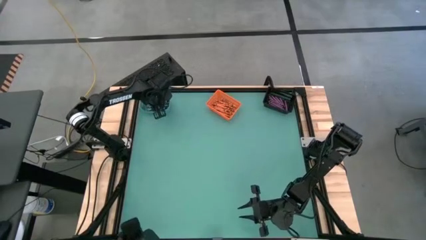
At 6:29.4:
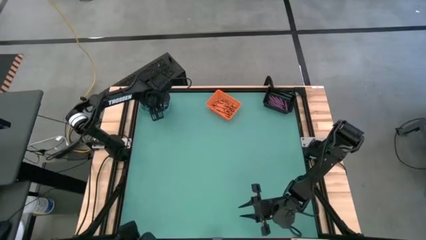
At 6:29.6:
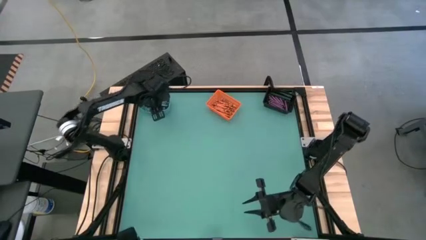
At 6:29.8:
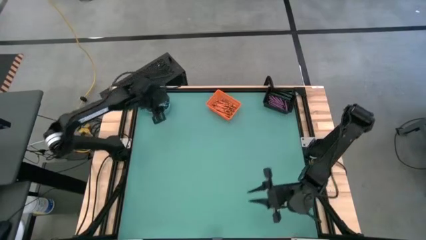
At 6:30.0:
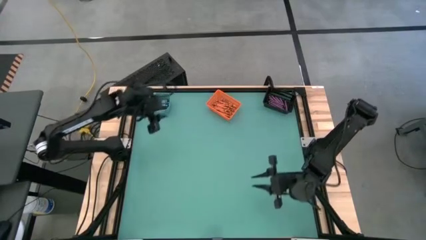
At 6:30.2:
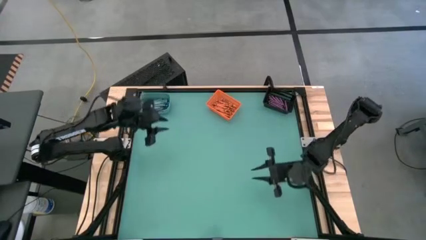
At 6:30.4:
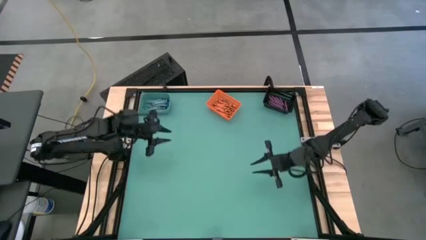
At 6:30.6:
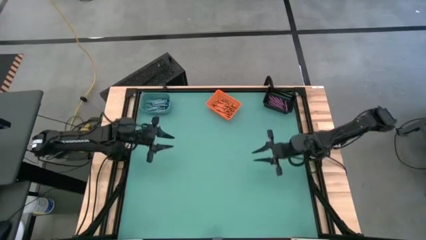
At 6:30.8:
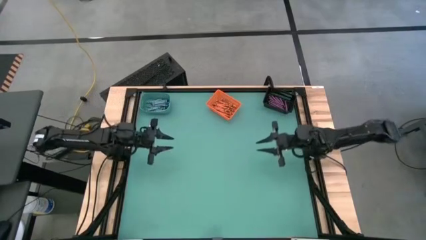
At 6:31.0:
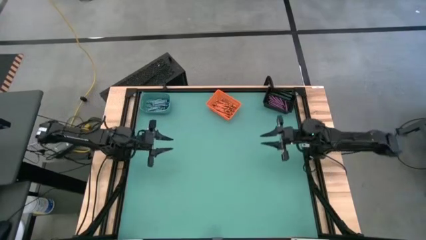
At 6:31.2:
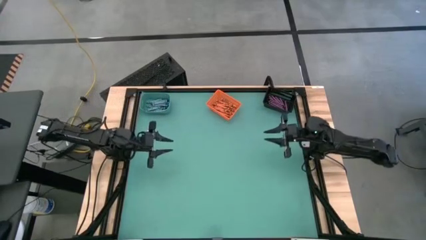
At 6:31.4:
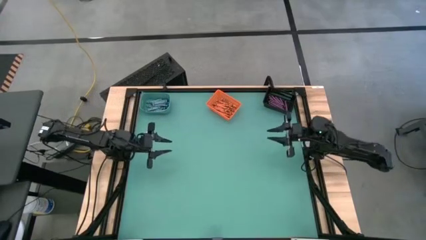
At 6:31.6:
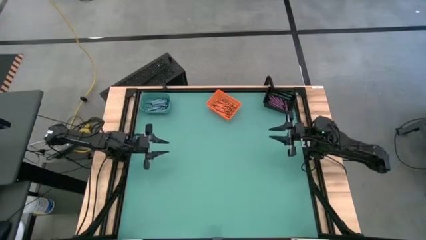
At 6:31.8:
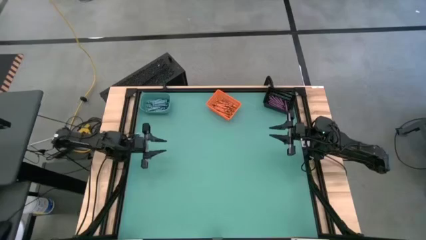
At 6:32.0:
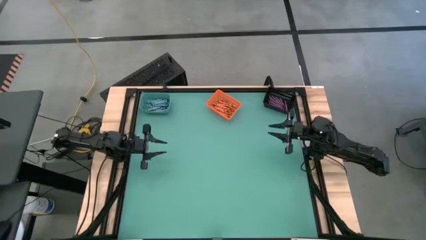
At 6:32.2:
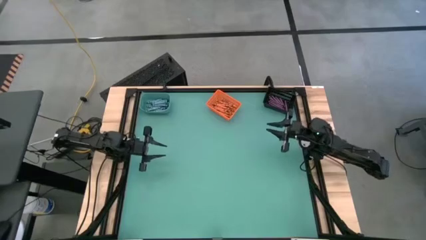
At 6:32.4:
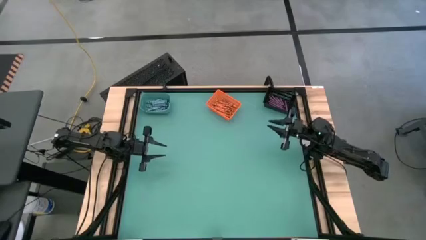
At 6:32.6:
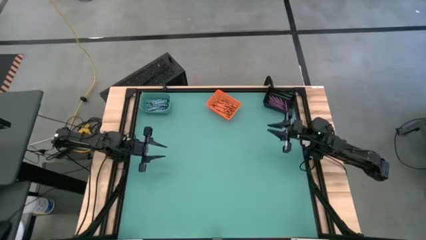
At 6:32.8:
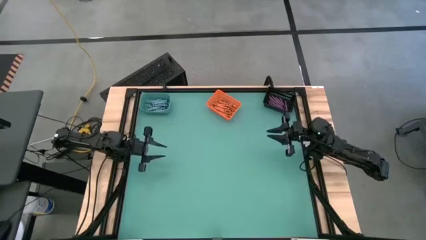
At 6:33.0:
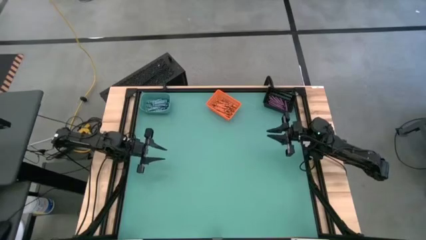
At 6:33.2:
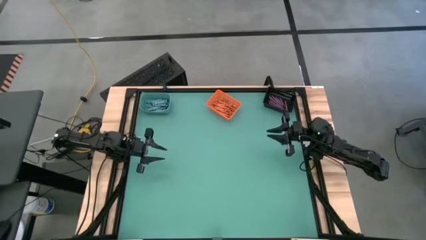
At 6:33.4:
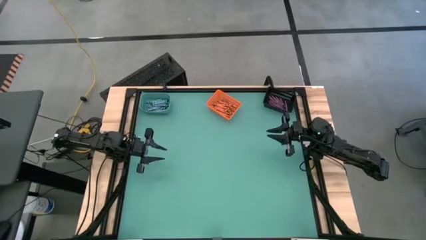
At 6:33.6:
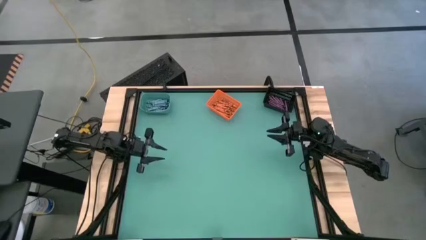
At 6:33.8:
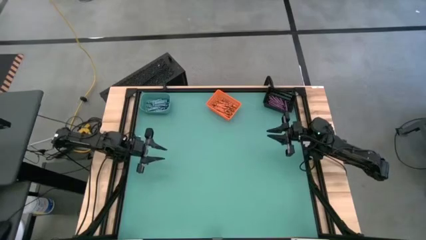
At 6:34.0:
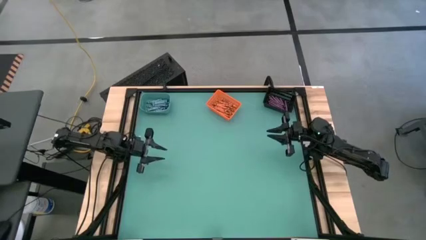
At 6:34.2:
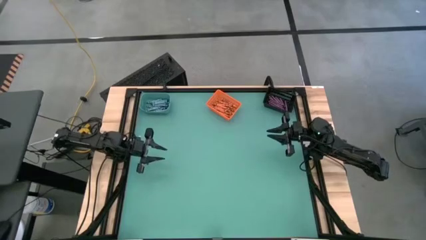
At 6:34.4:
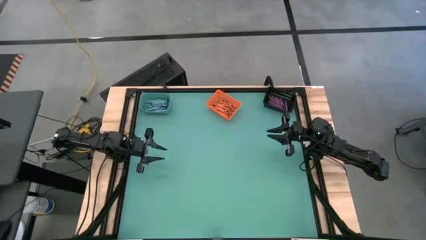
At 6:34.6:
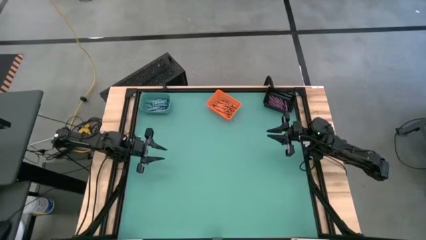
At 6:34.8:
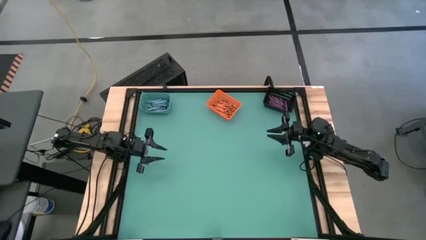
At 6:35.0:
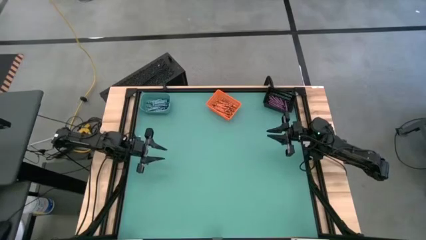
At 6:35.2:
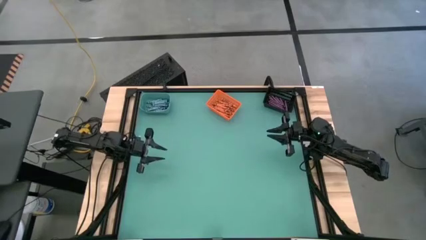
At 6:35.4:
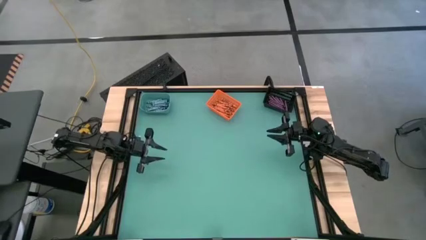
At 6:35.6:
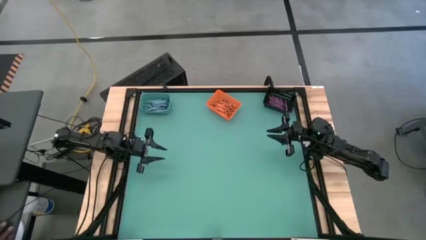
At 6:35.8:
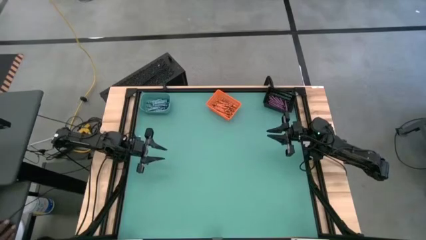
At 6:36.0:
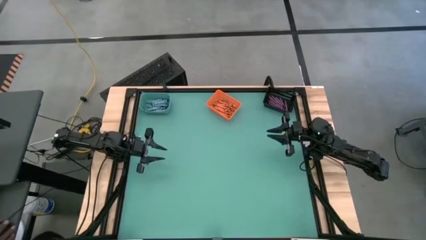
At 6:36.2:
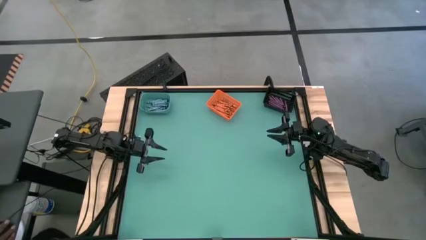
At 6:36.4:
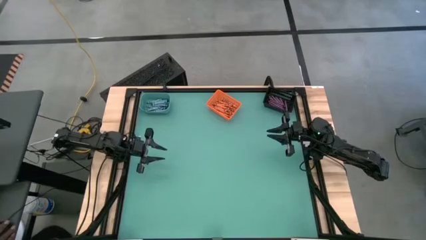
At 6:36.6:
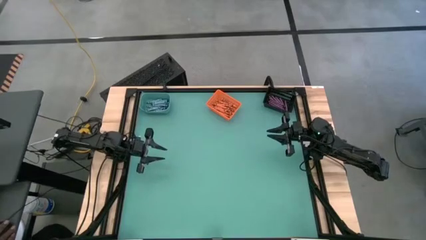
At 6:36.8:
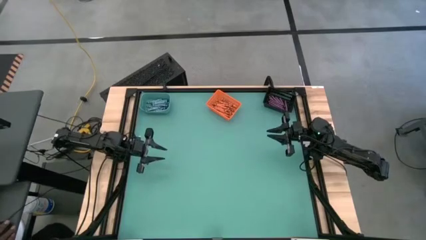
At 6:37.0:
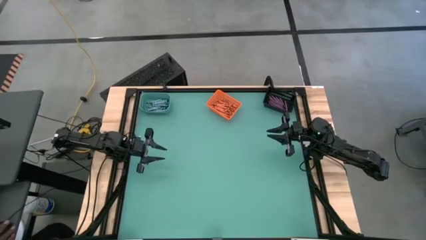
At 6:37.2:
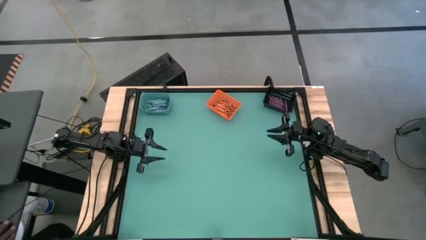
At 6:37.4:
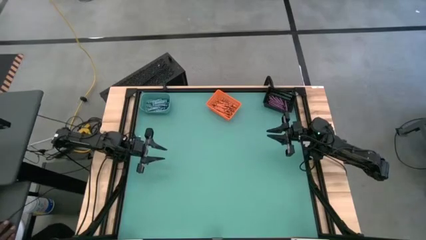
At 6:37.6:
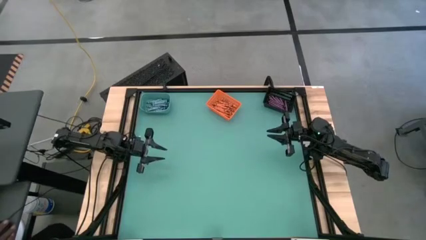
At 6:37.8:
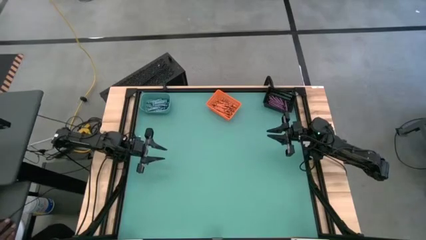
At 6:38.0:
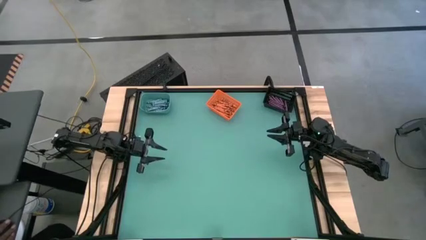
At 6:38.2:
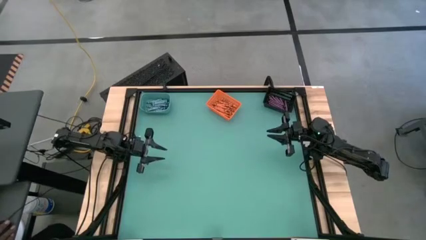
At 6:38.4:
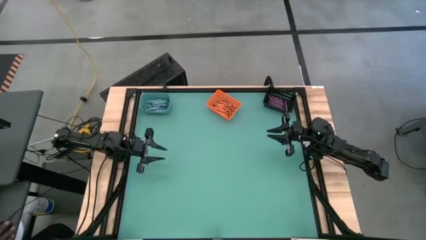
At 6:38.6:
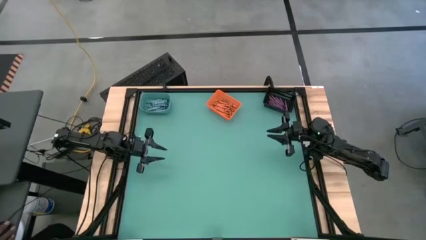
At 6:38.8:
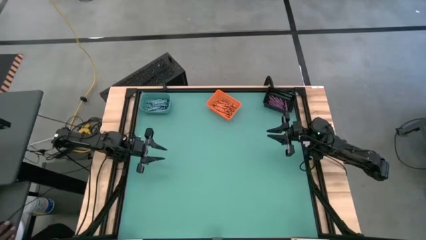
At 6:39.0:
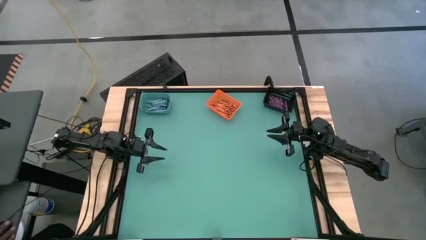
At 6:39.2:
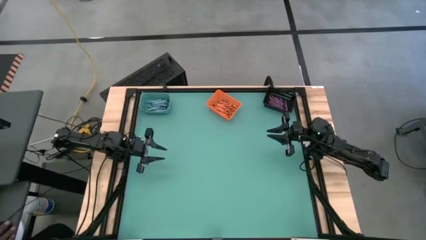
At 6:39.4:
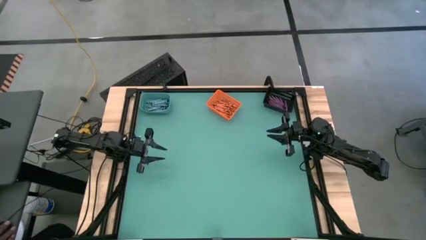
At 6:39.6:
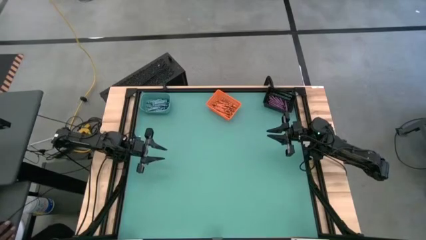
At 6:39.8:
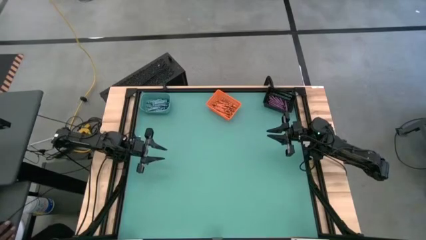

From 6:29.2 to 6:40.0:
Task: Sort crayons
Return to Home Position

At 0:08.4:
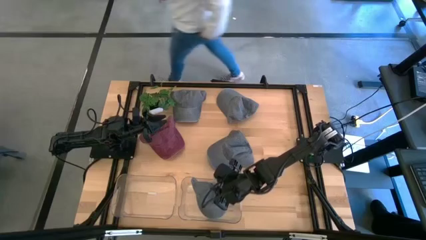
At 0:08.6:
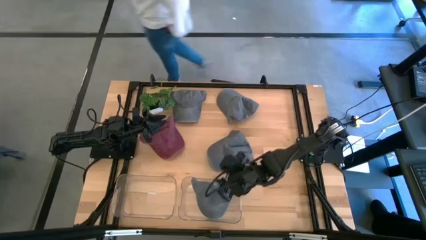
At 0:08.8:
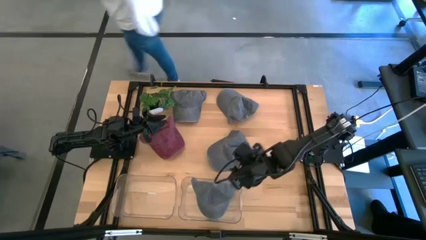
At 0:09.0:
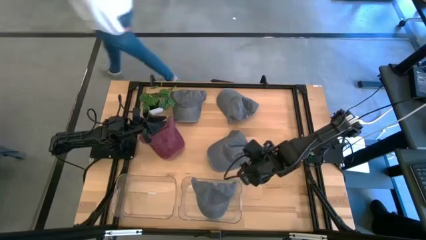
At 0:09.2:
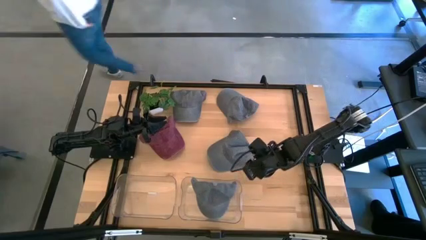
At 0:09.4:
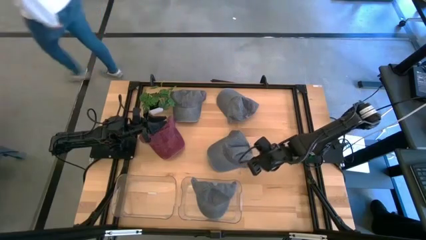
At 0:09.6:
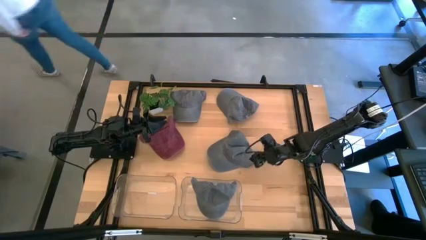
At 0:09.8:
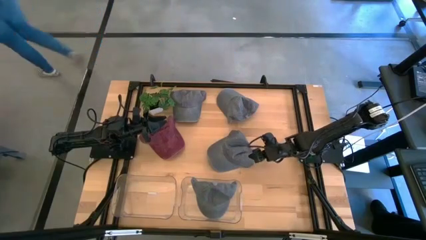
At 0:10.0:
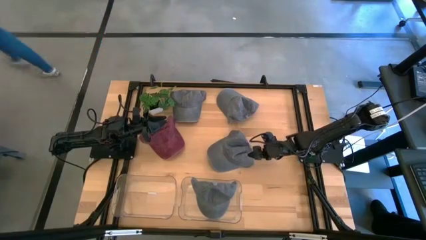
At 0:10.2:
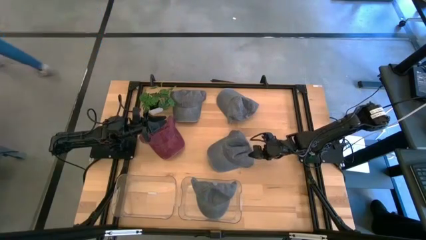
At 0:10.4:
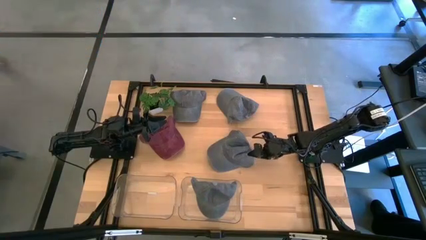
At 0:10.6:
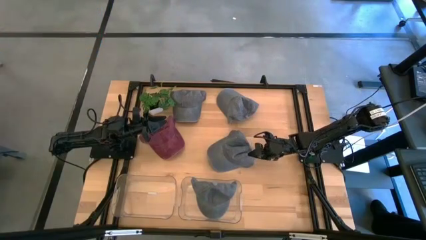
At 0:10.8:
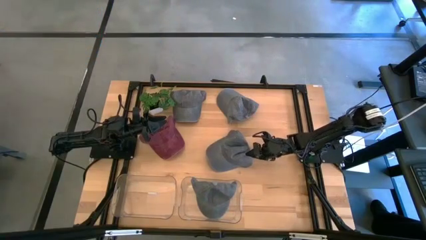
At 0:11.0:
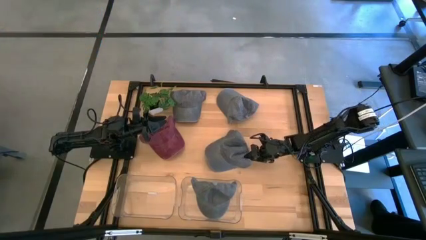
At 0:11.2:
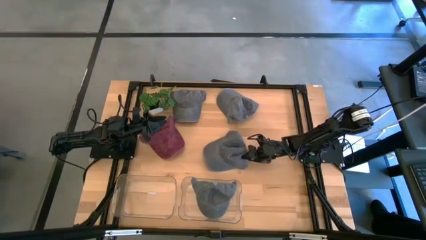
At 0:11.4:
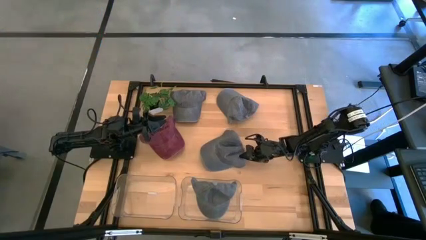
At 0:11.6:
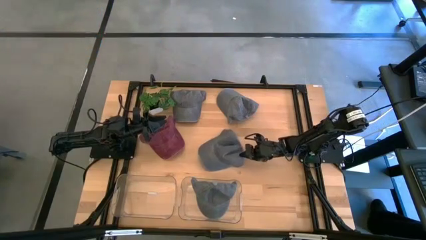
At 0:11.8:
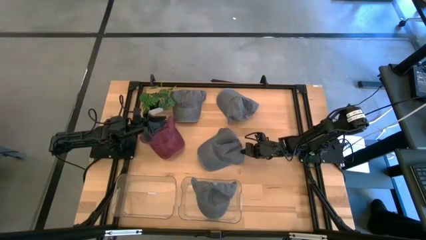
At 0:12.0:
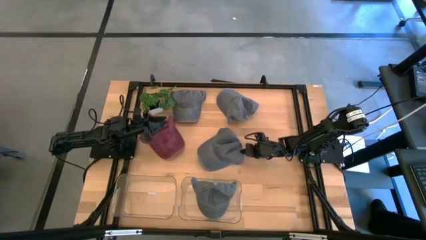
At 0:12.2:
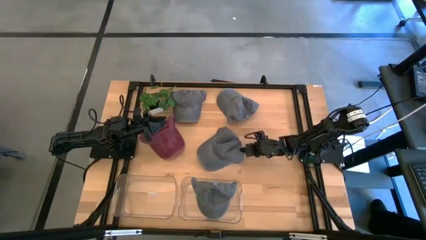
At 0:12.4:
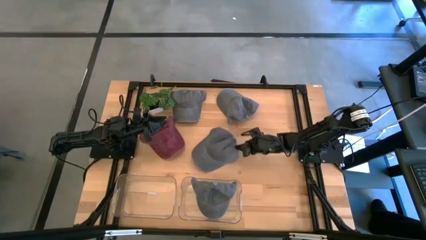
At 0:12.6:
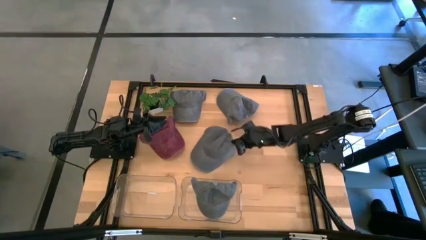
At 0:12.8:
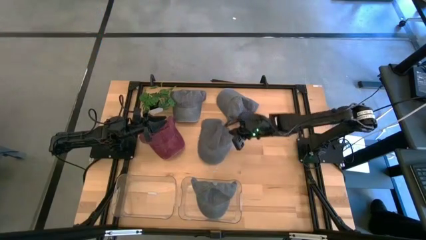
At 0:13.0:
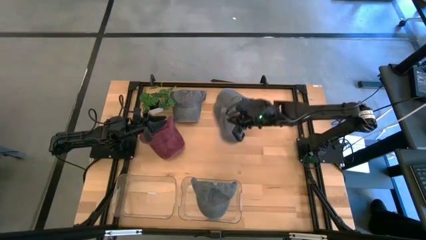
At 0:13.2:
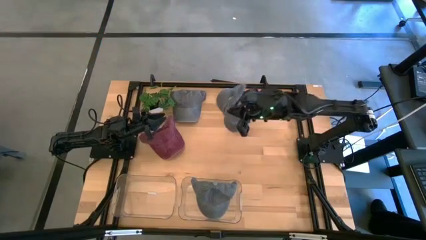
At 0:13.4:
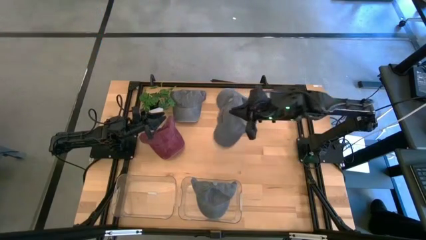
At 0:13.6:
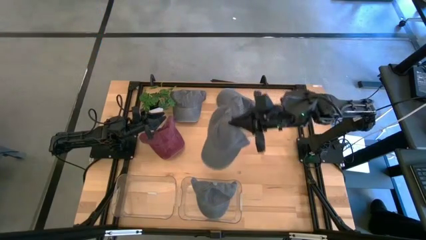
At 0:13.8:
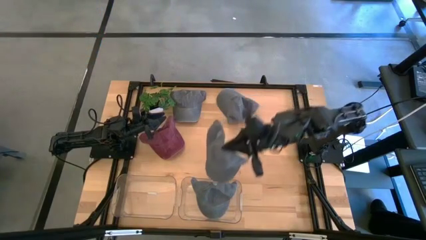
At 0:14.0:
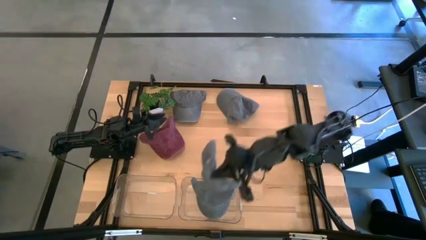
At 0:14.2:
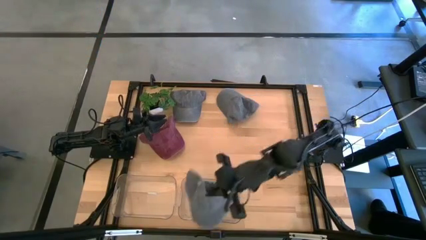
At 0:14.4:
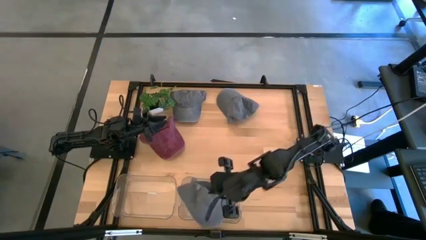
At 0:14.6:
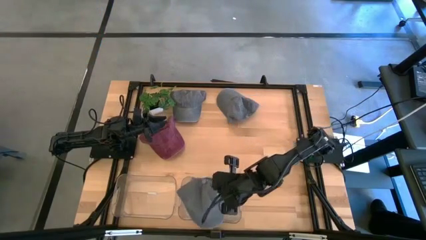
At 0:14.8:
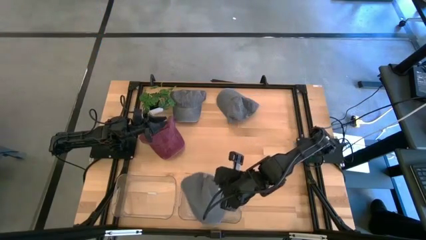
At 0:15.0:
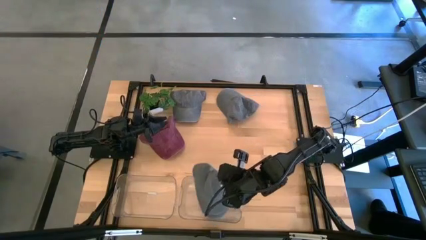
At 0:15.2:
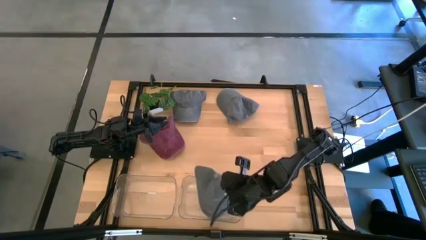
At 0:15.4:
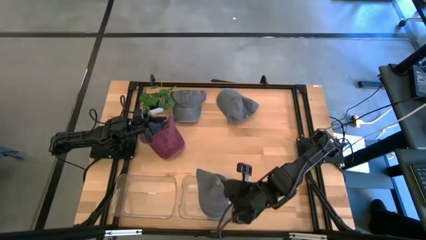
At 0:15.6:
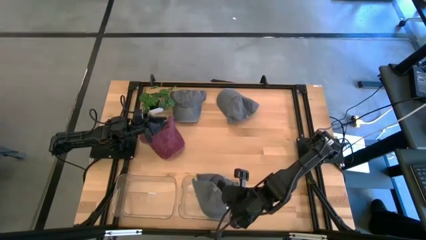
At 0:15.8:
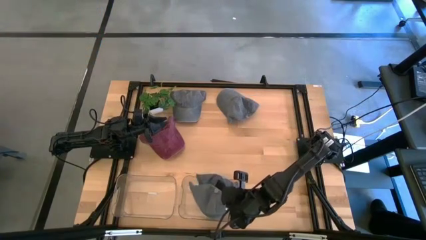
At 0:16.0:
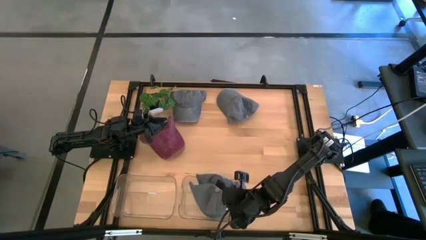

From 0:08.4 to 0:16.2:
Task: Pick & Place hat
Put the grey cap into the right transparent bin
